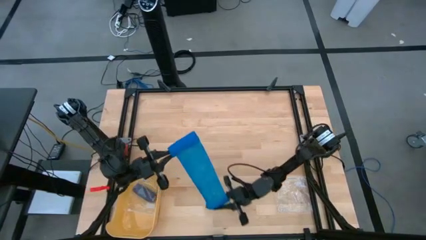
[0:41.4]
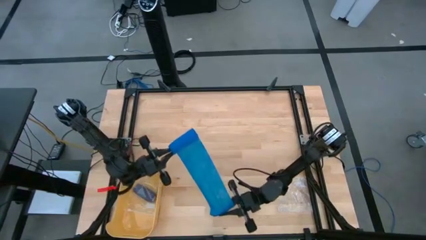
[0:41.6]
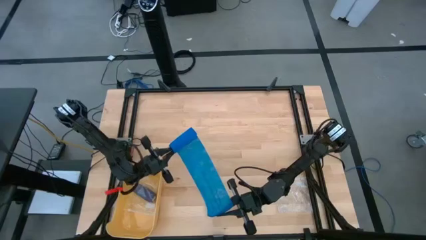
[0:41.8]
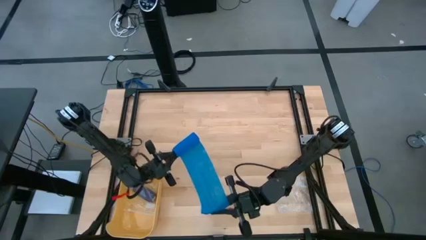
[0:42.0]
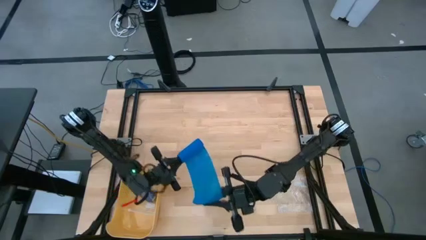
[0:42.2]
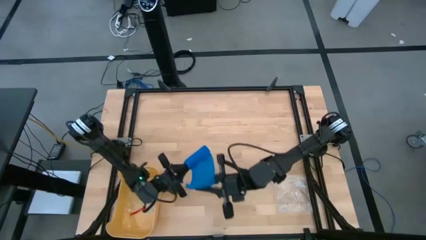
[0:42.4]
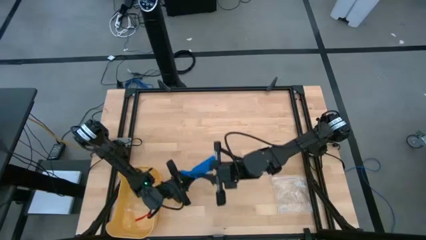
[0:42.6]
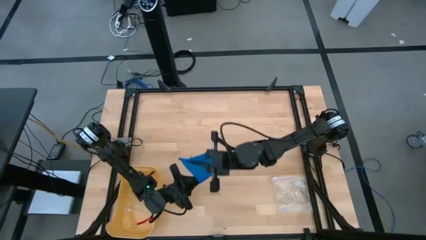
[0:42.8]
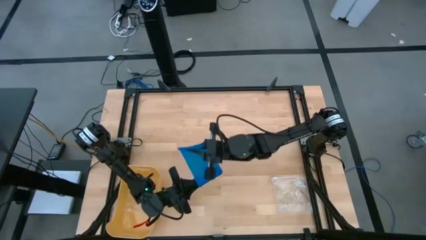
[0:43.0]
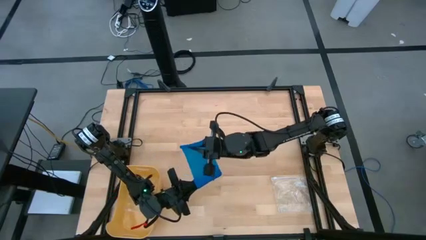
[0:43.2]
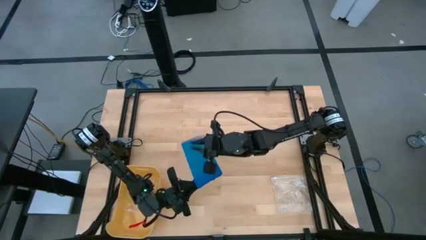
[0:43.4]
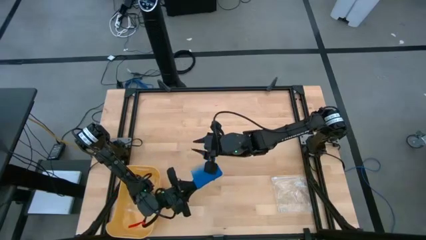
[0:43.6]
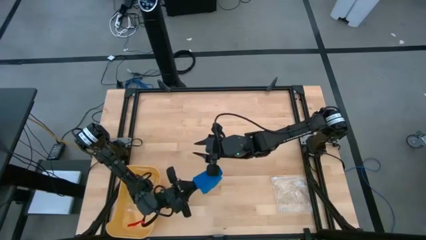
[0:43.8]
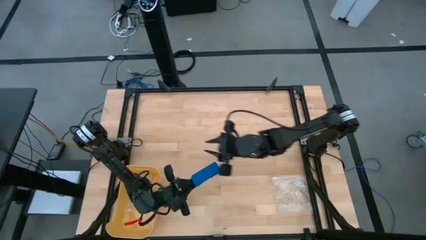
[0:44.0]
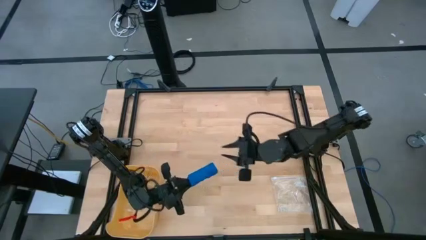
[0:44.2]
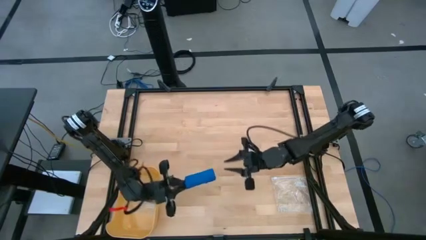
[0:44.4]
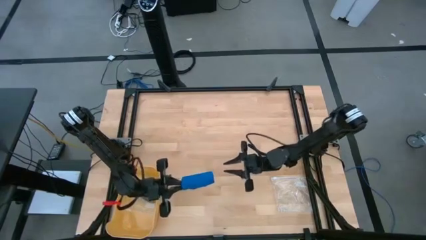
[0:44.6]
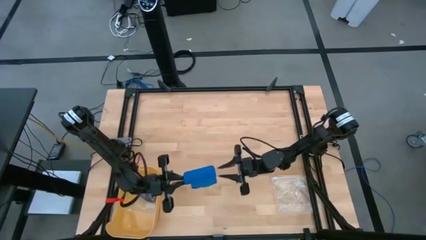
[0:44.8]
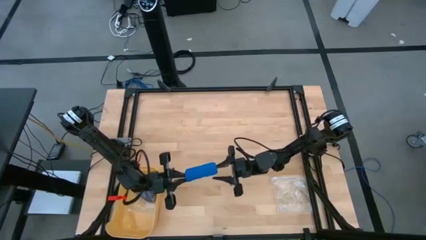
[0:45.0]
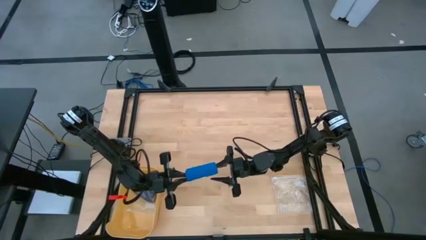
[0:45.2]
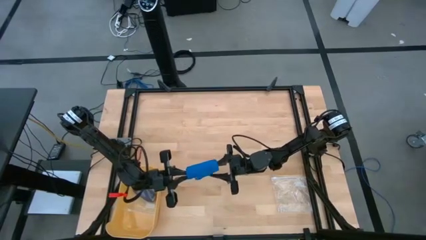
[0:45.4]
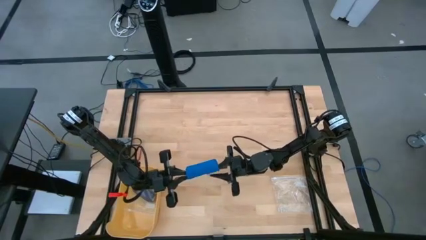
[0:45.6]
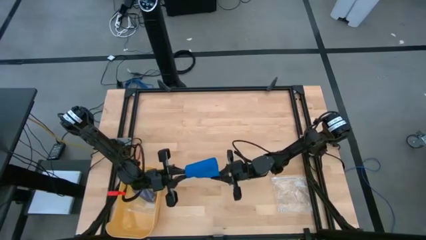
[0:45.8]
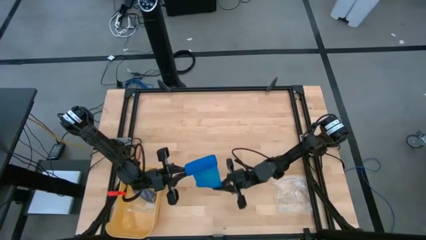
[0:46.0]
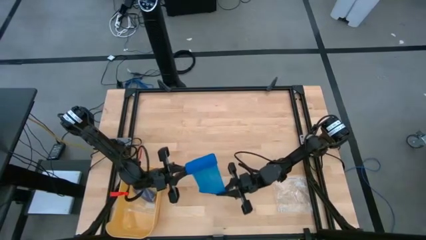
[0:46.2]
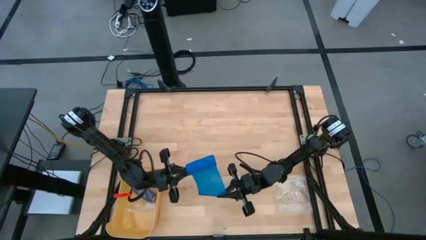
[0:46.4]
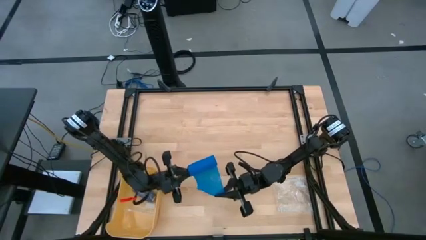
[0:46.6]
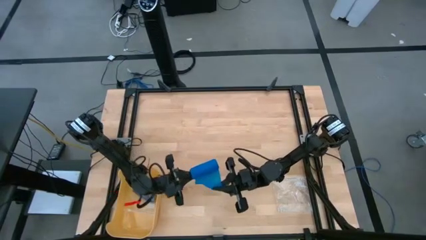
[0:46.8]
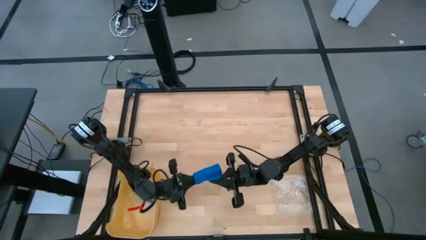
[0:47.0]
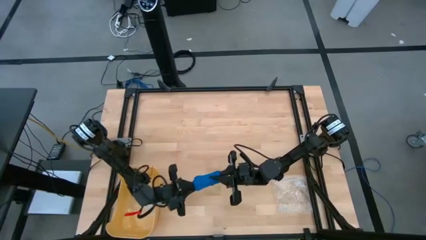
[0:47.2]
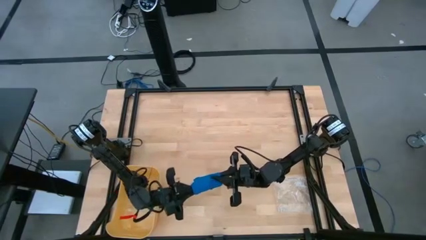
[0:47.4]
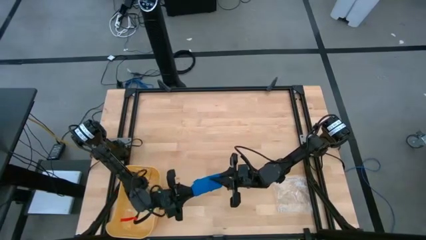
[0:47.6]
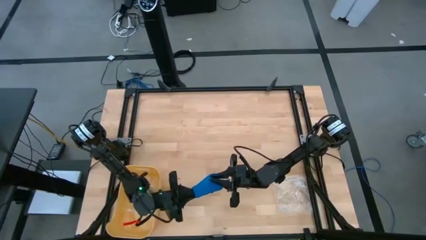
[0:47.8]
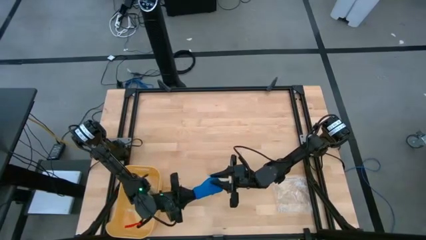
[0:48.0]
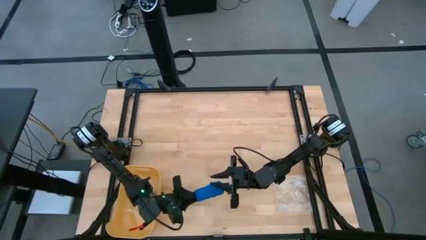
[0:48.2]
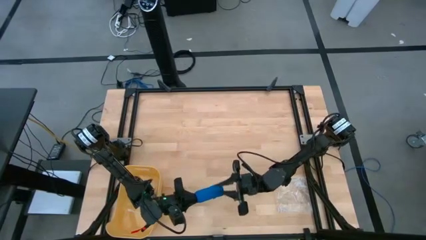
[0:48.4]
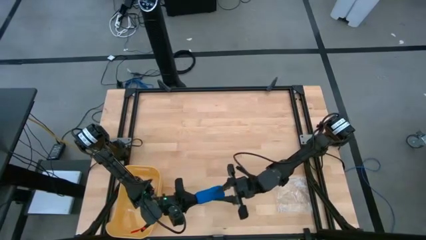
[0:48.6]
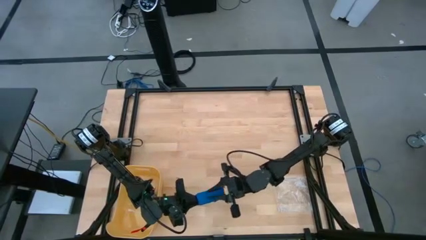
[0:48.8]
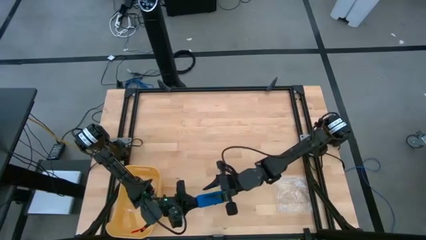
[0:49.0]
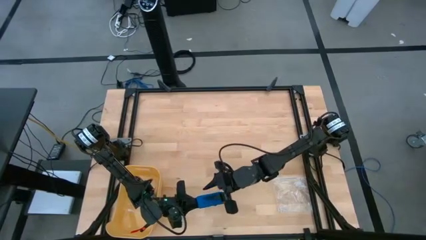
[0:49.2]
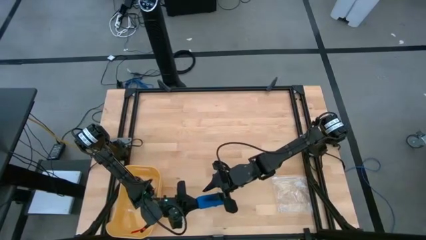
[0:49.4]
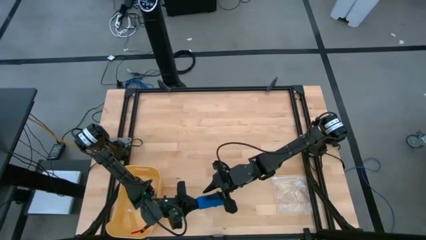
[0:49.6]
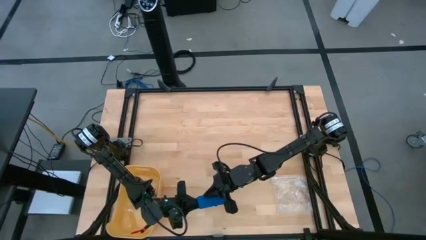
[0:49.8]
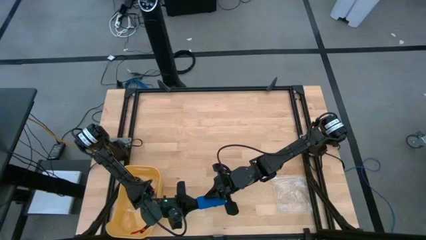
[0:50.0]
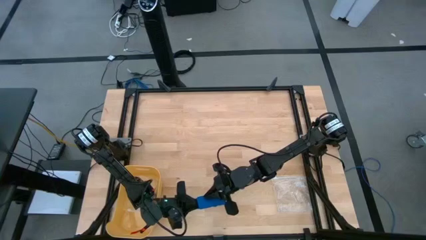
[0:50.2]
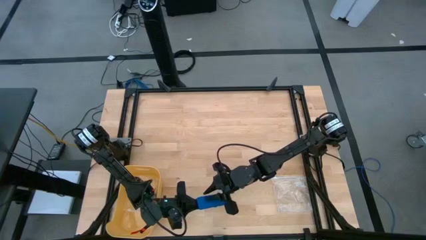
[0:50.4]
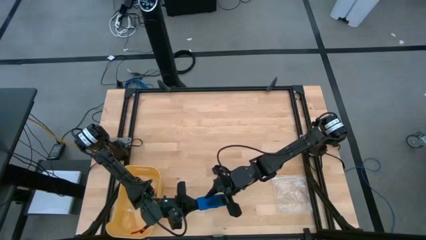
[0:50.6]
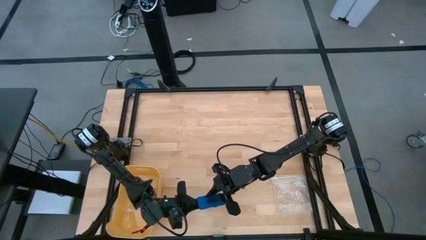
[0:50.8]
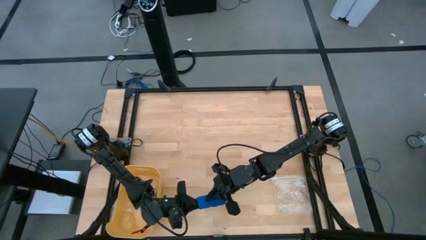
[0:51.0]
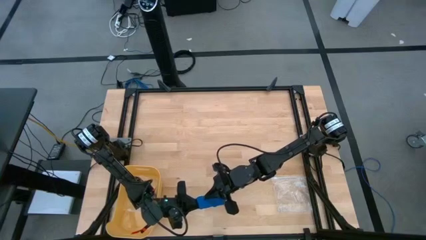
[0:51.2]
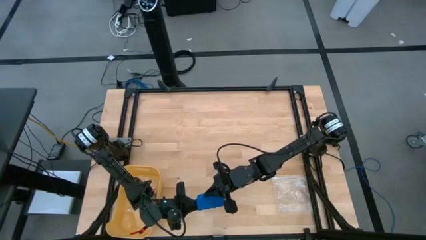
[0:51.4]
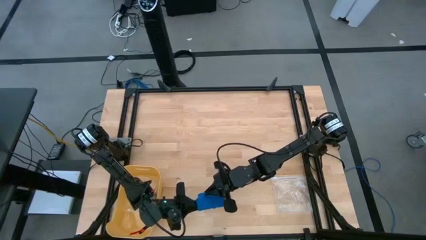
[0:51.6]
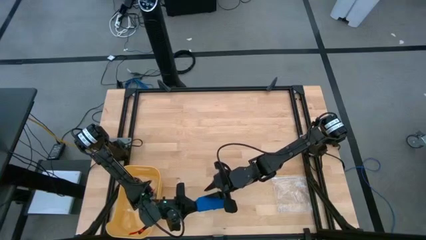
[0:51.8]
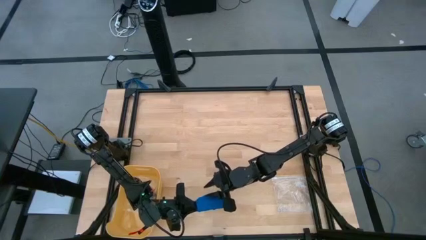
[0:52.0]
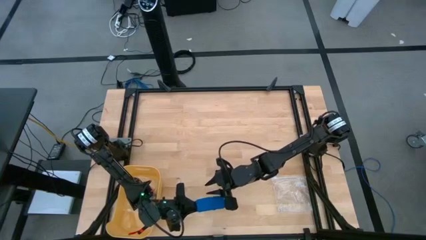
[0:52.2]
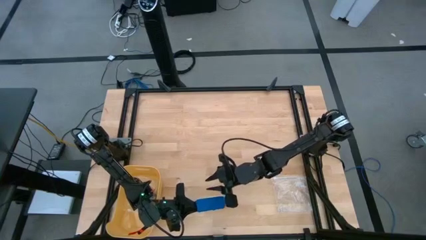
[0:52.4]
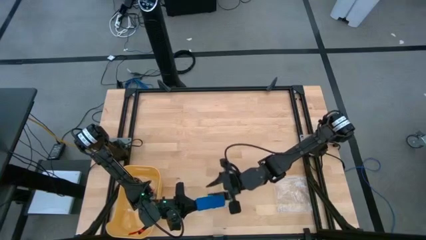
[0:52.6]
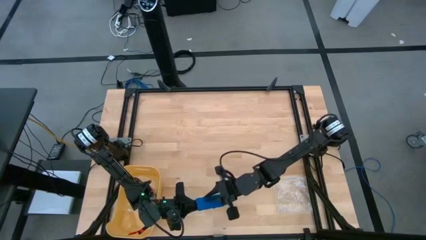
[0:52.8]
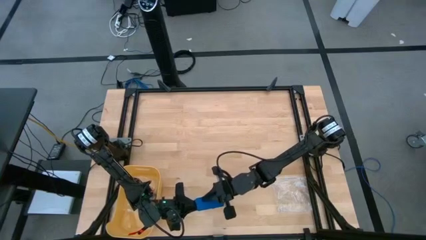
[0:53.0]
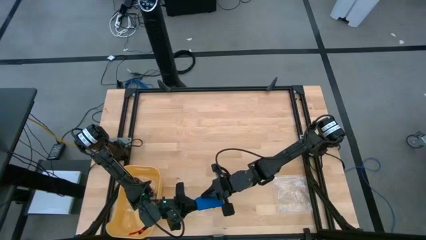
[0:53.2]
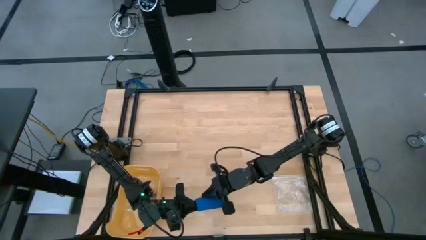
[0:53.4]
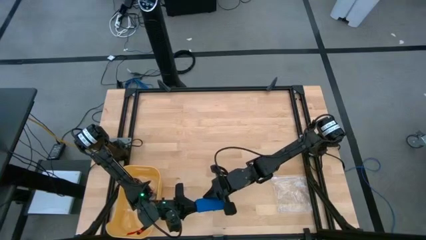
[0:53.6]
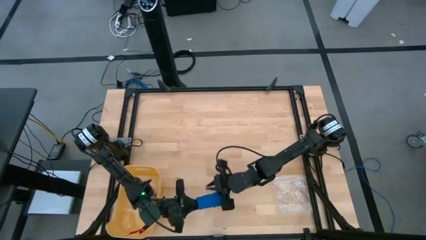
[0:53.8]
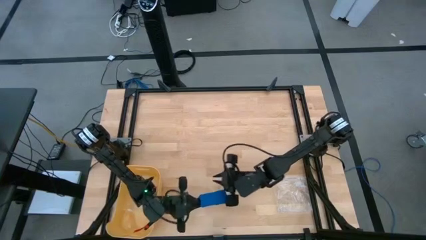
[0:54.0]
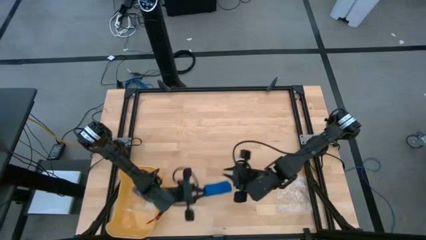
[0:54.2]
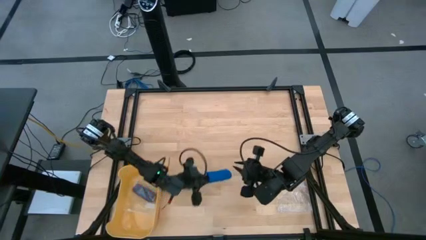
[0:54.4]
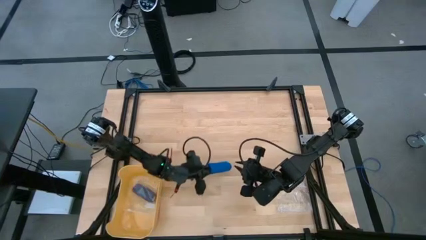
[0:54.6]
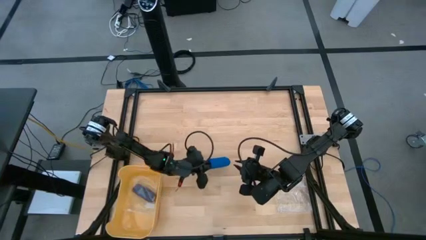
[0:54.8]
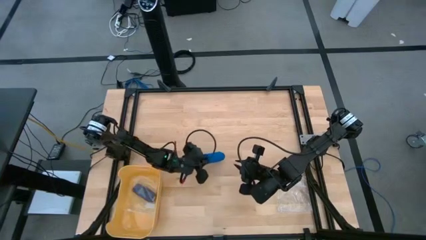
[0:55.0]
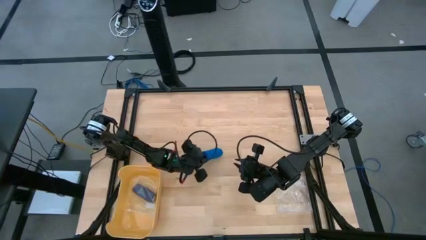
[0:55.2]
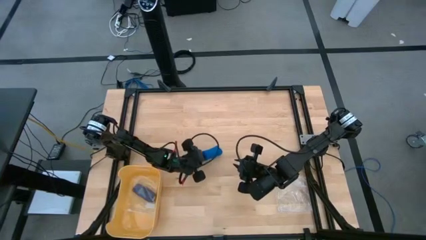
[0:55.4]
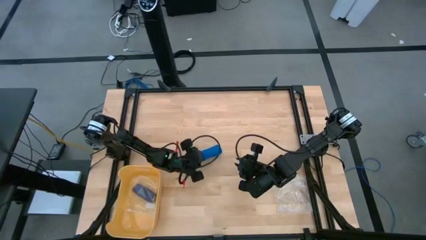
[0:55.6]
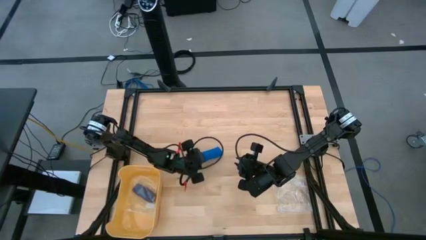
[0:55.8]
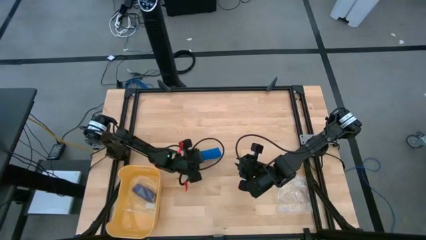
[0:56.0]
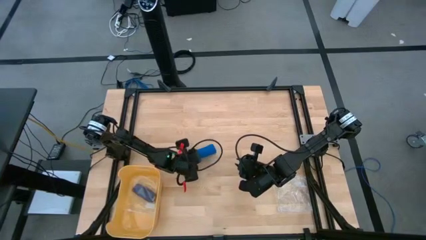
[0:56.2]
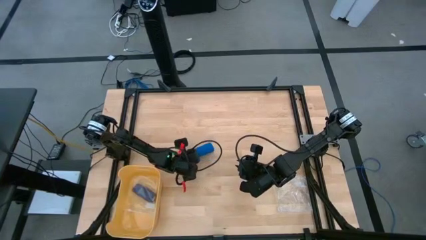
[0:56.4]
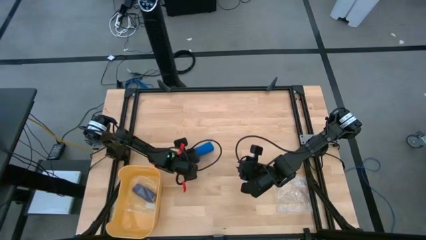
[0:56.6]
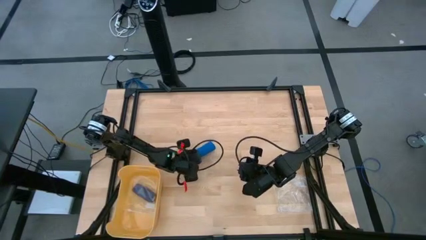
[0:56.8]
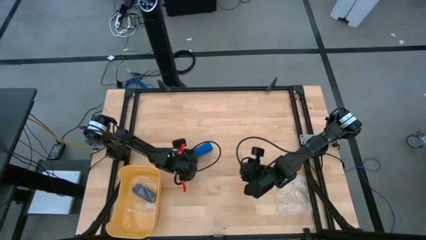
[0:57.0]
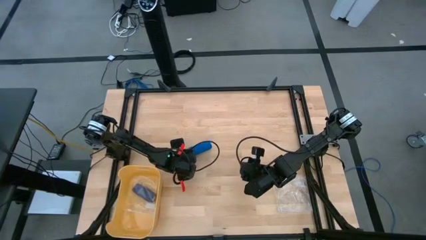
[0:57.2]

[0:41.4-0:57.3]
Task: Roll bandage
Roll the blue bandage

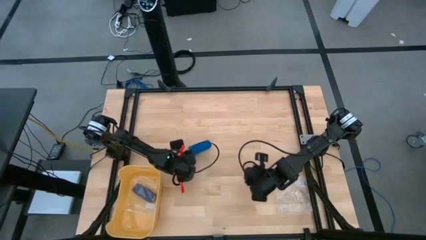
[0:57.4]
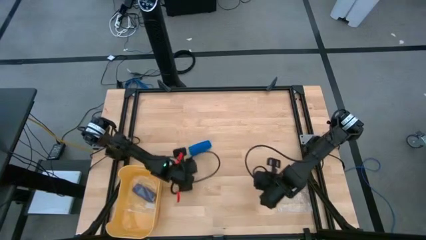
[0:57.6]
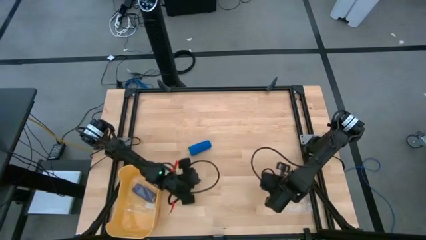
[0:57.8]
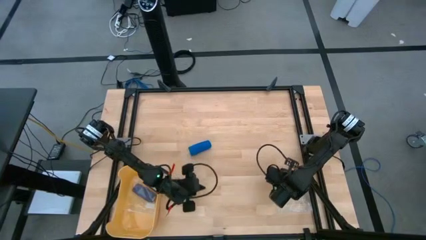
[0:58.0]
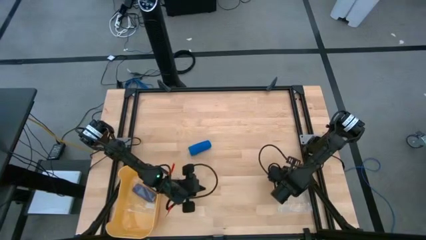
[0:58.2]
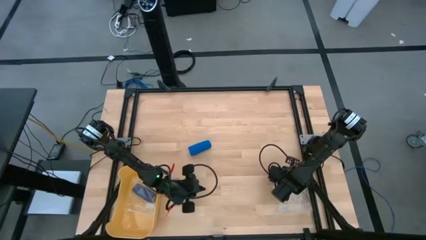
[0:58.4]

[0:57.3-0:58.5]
Open the transparent zip bag
